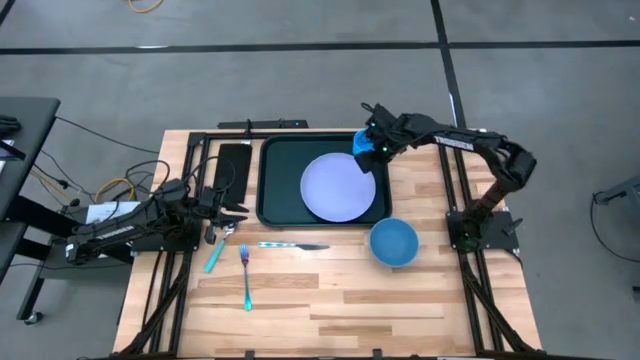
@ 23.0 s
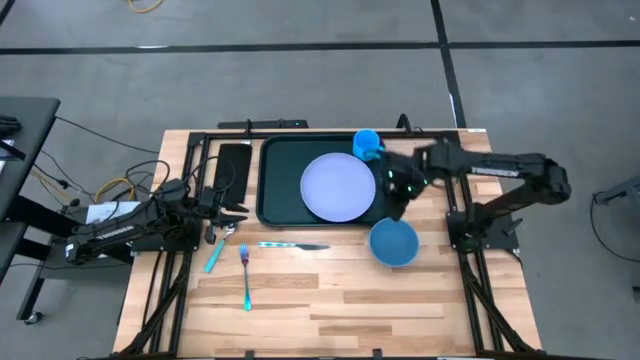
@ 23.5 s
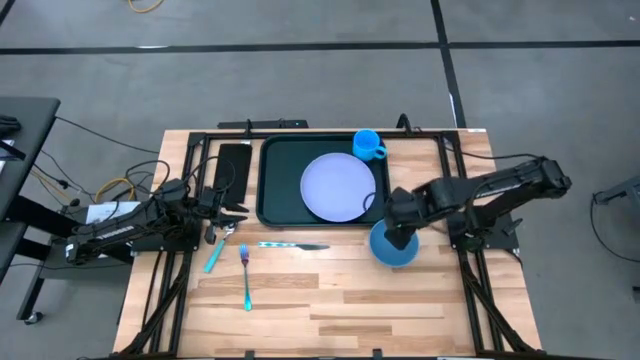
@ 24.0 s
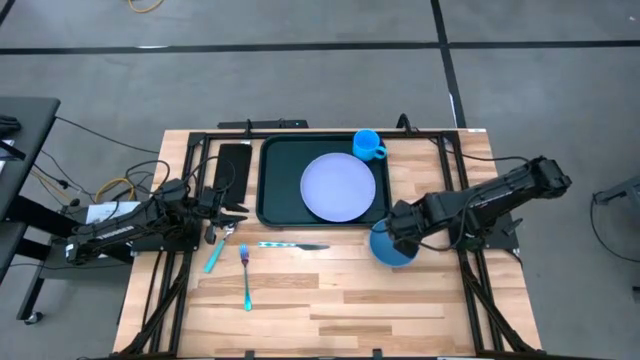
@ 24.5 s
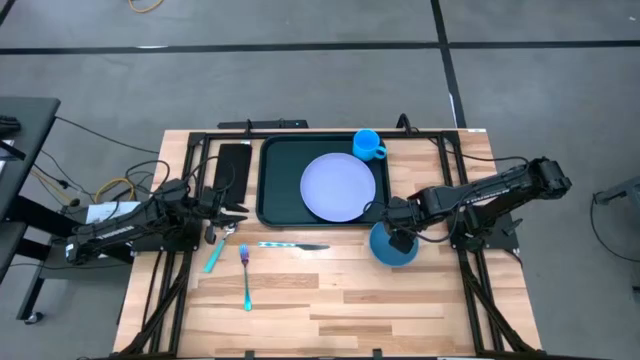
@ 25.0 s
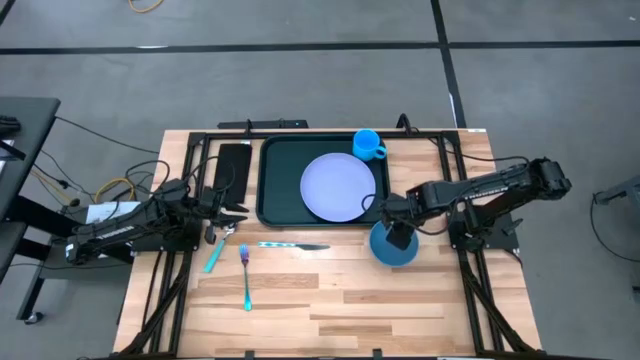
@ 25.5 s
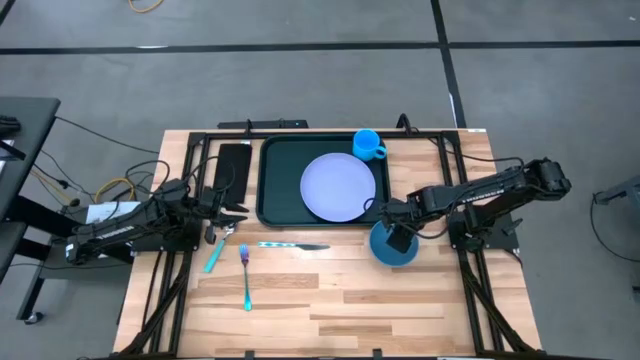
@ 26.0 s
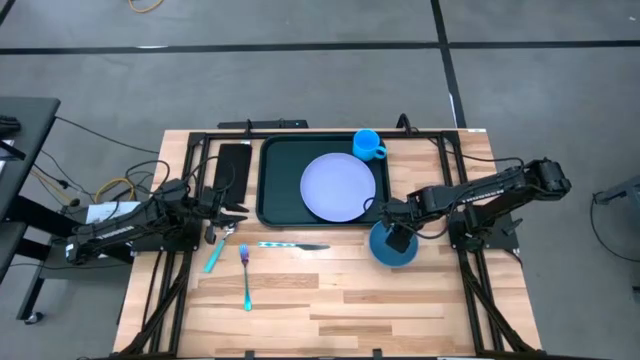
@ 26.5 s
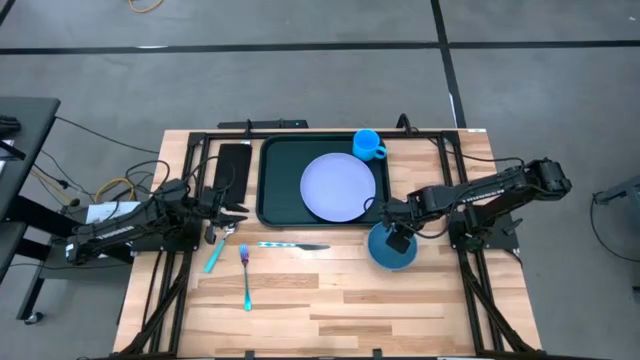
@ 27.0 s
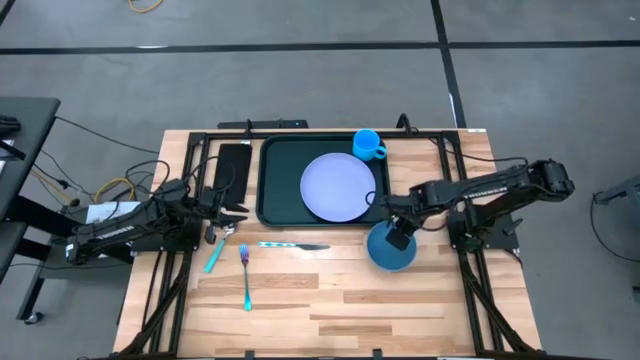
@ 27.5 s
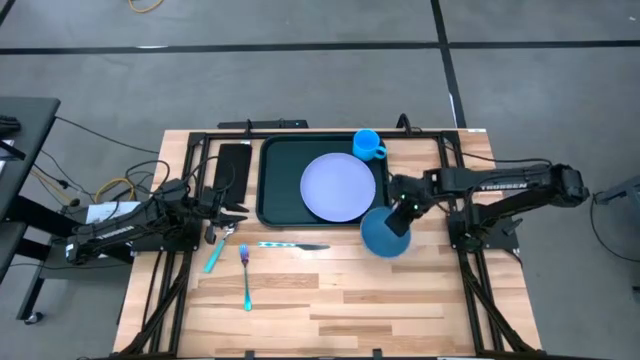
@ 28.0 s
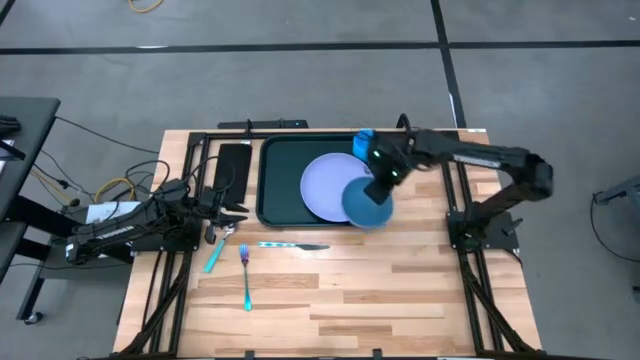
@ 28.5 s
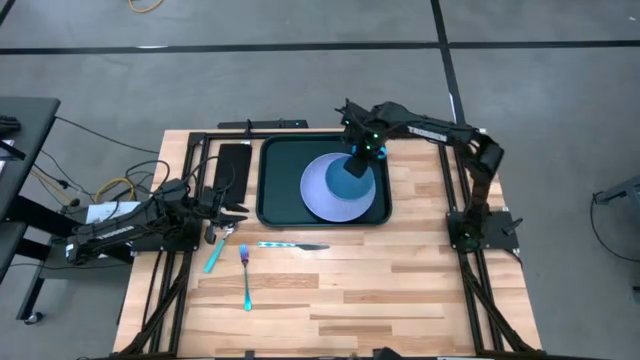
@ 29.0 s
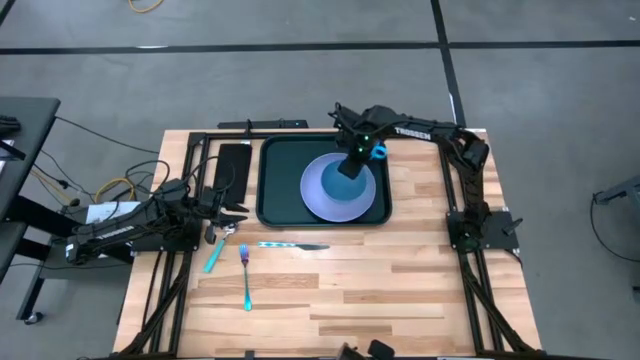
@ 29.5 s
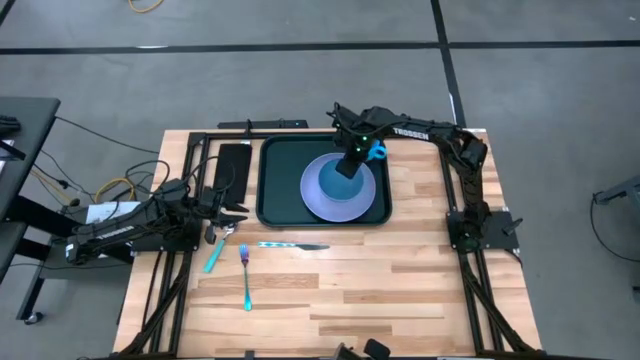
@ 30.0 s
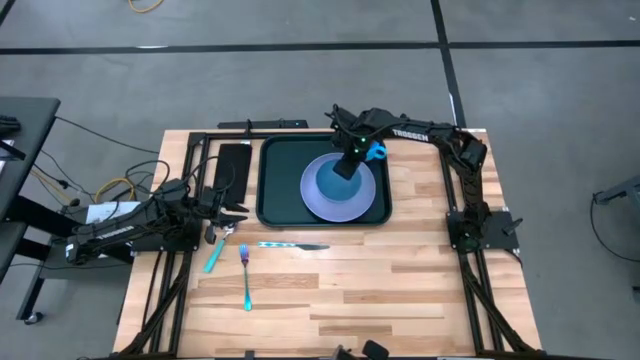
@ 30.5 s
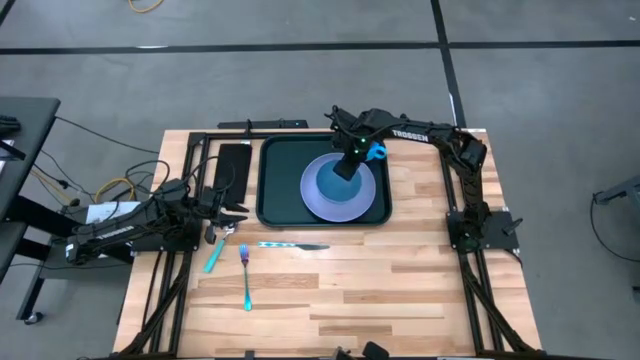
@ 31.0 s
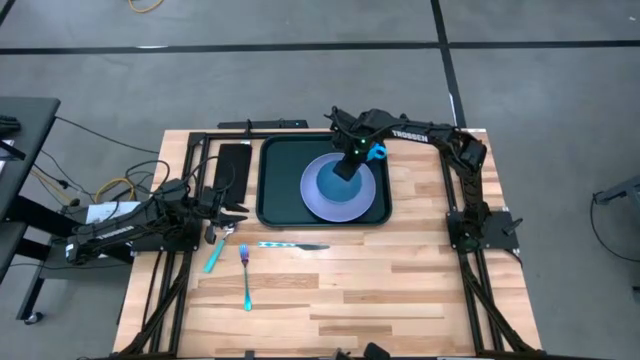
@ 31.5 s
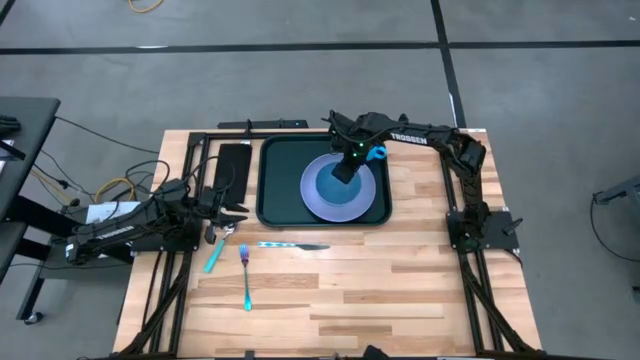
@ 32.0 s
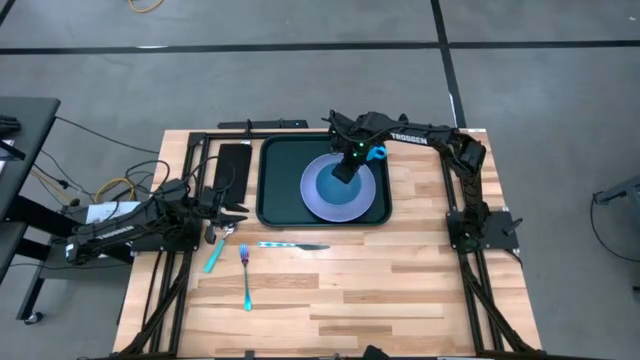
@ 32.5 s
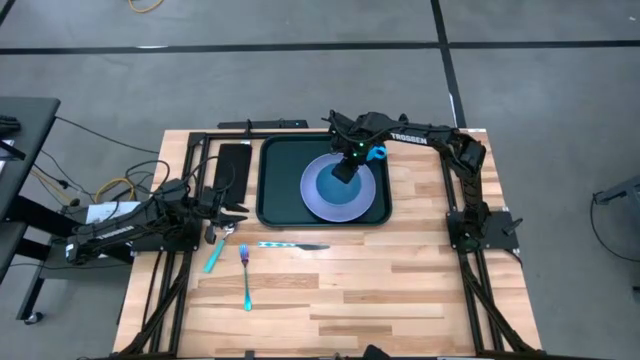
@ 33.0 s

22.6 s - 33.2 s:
Task: Set up tray
Put the blue bowl on the purple plate

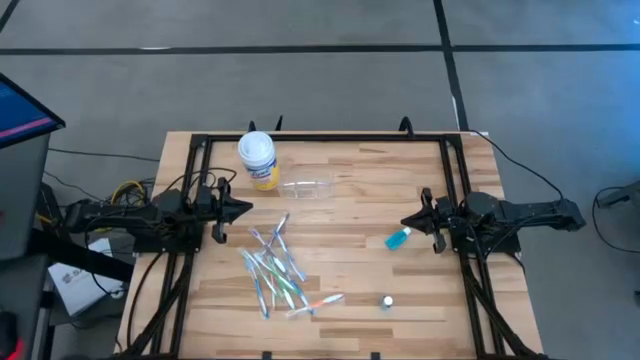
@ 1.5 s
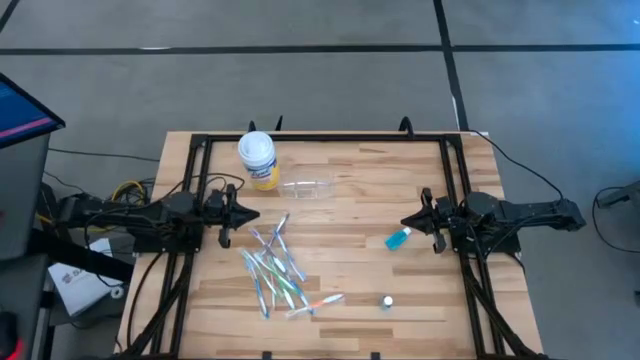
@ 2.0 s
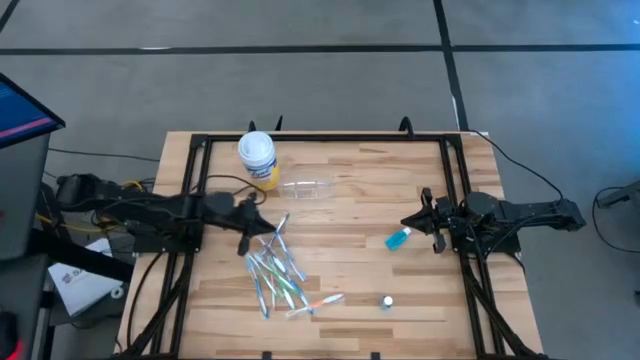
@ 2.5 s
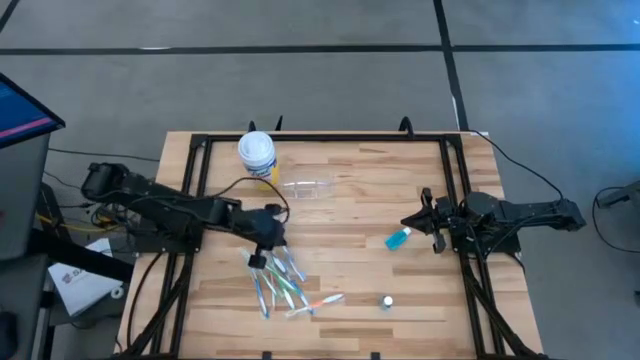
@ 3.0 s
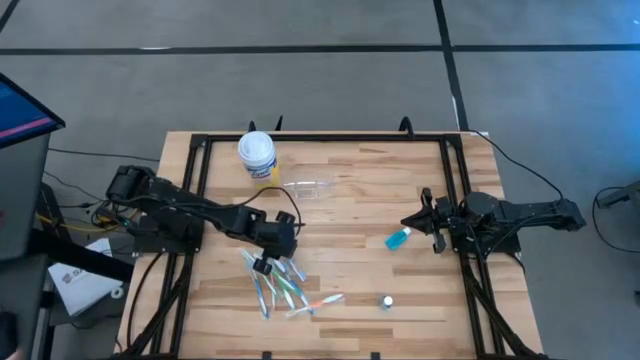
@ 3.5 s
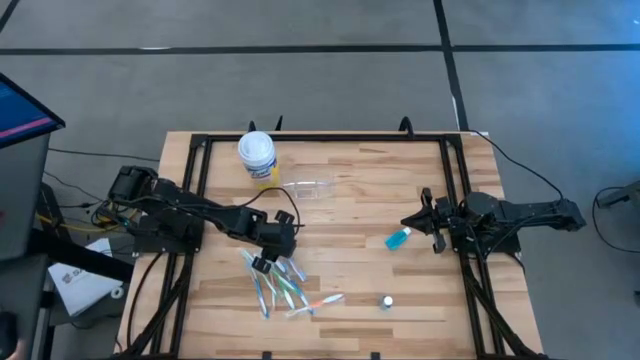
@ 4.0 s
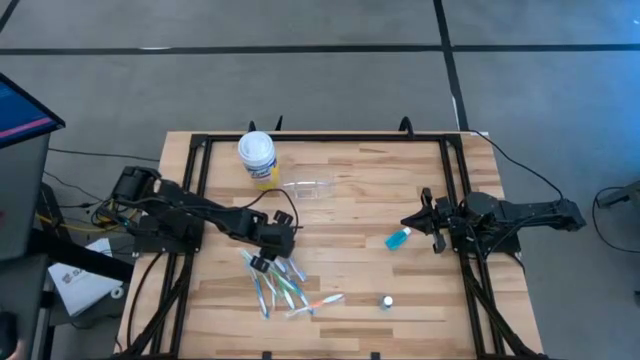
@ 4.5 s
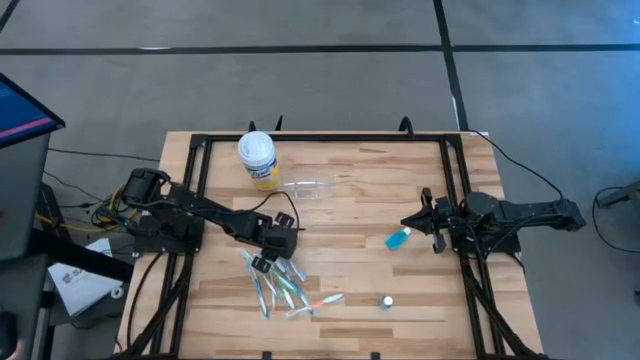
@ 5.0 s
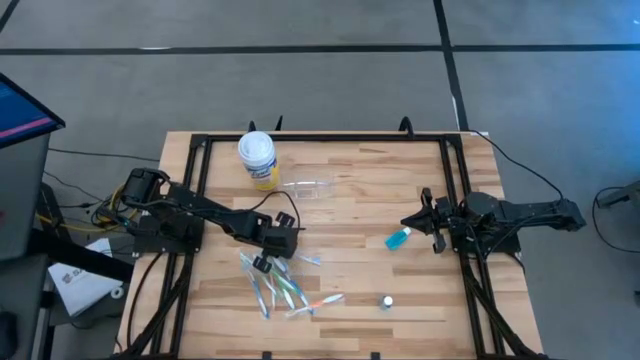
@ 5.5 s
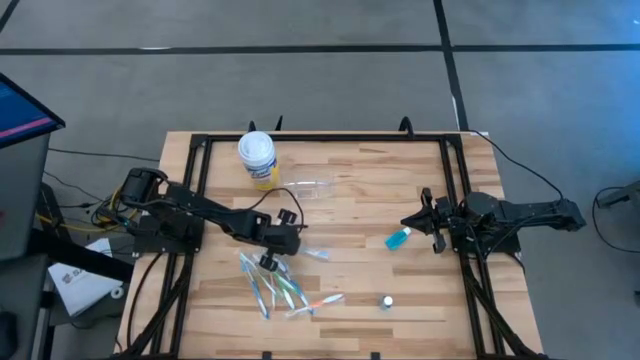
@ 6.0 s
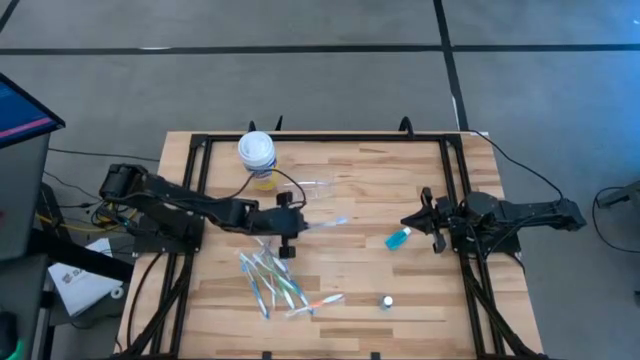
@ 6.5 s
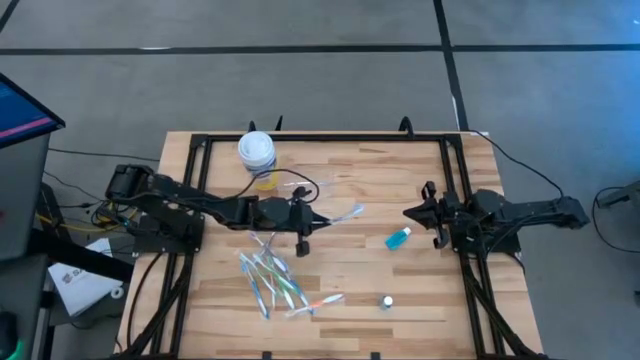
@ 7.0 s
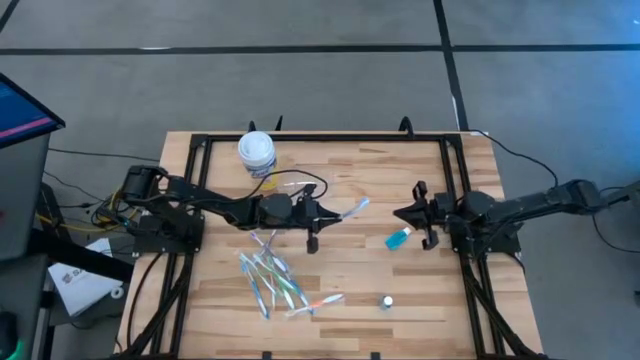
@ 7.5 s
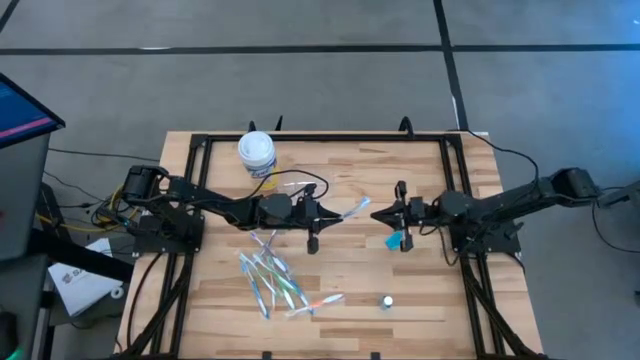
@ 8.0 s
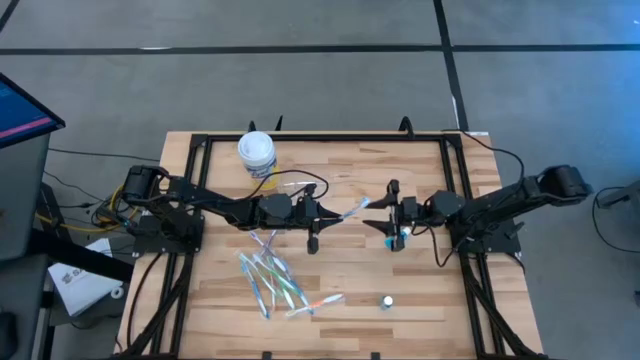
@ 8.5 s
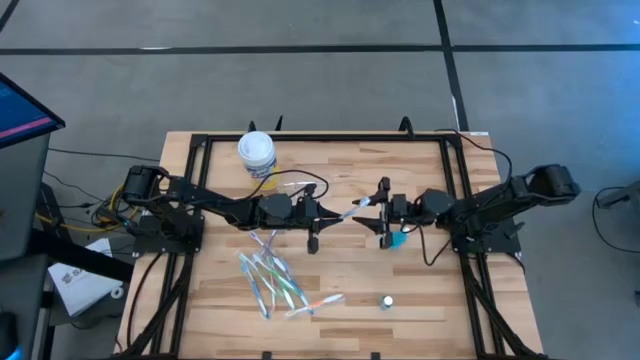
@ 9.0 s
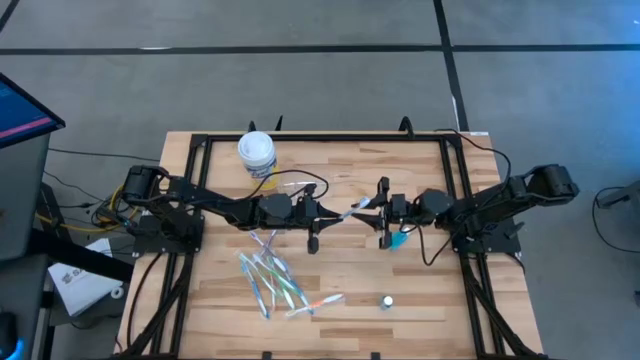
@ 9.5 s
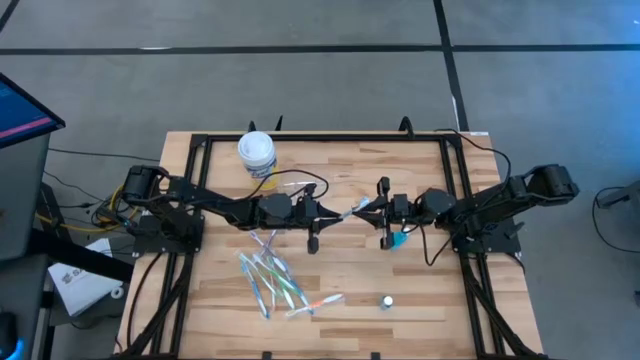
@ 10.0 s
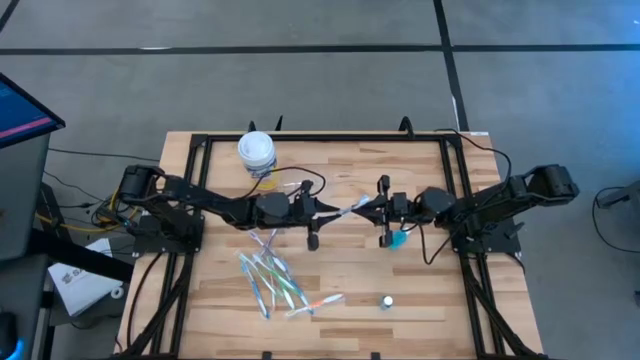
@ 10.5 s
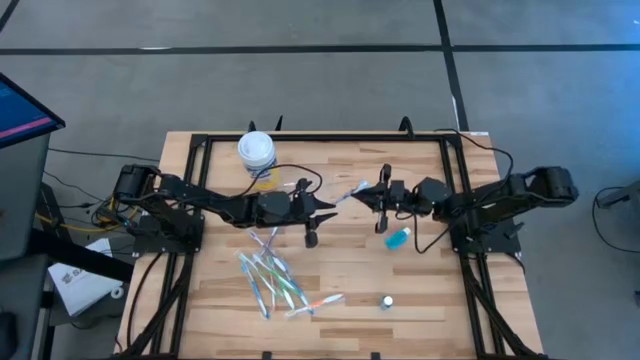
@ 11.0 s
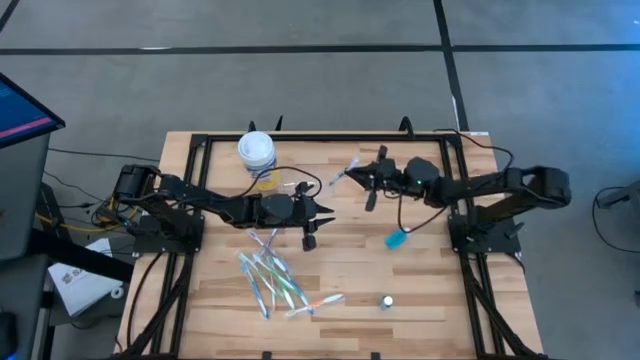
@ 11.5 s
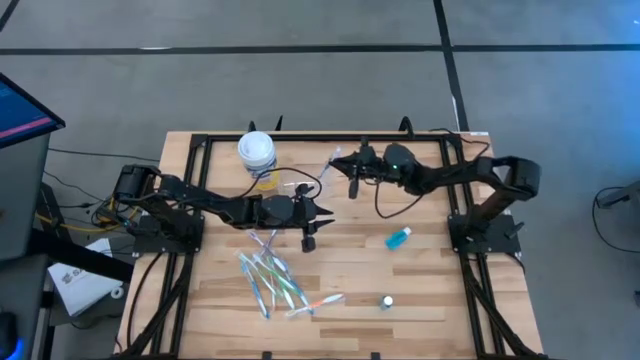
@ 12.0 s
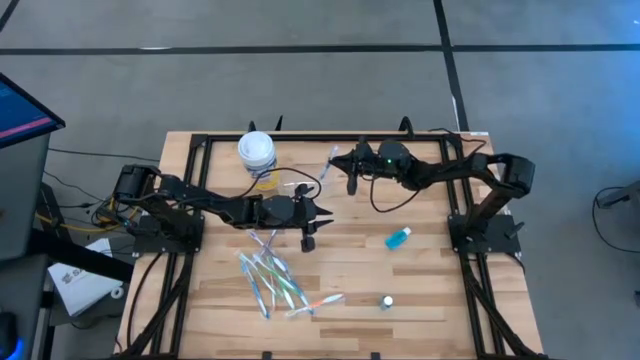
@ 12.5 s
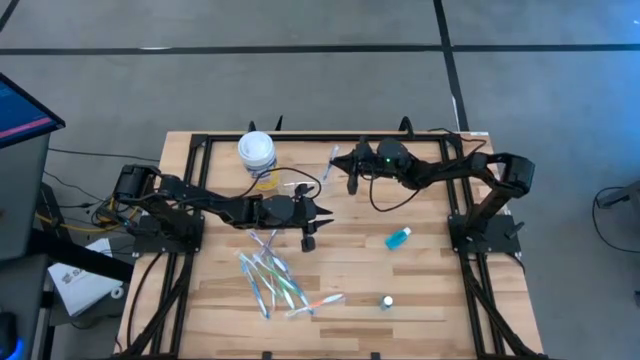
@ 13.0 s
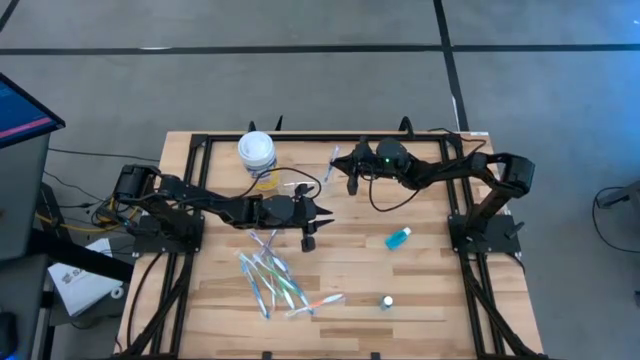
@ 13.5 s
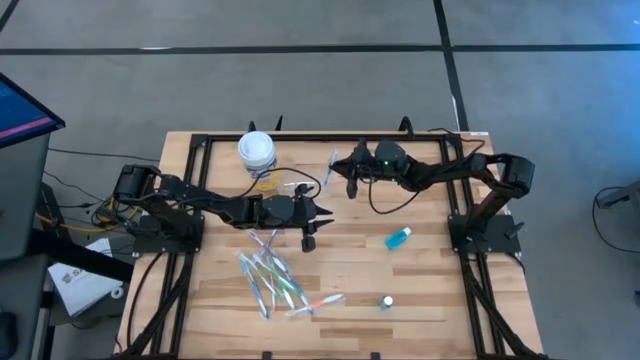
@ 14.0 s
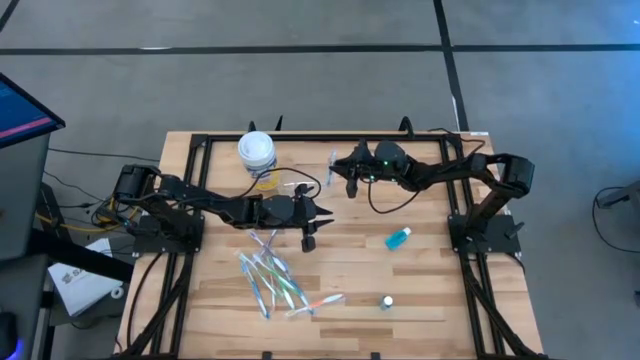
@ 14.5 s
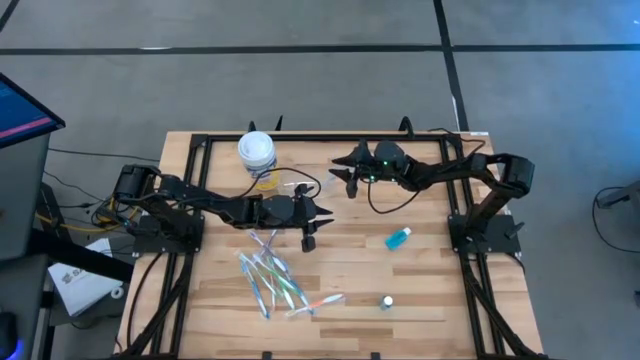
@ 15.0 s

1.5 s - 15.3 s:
Task: Pick & Place toothbrushing station
Put the blue toothbrush into the transparent organizer
